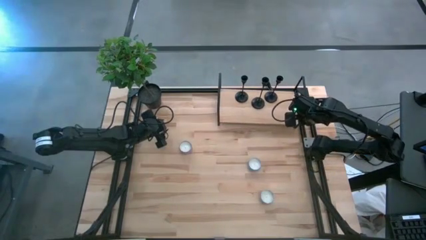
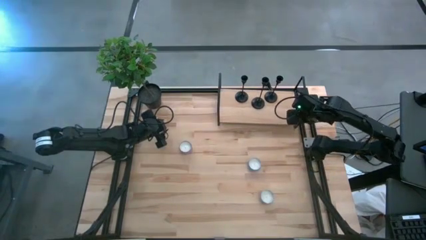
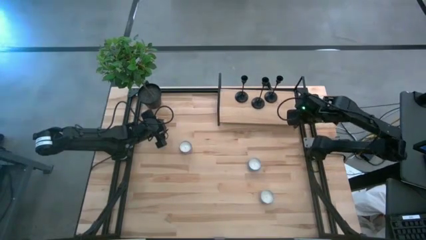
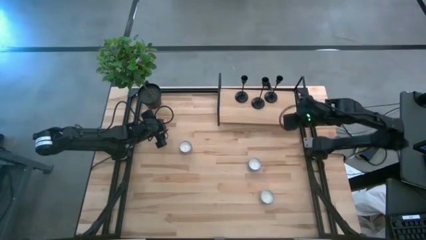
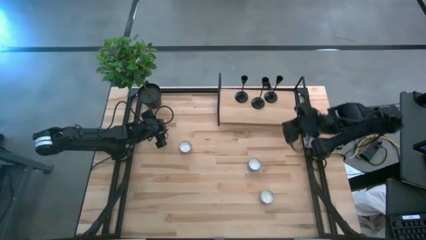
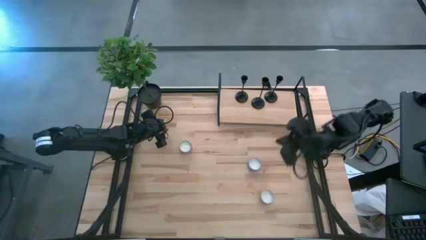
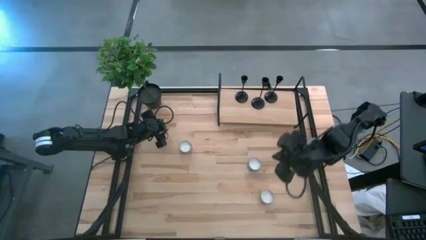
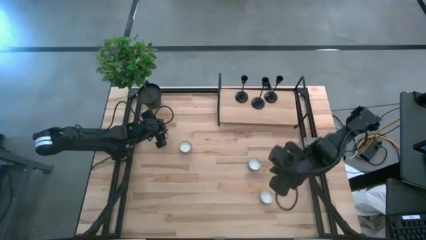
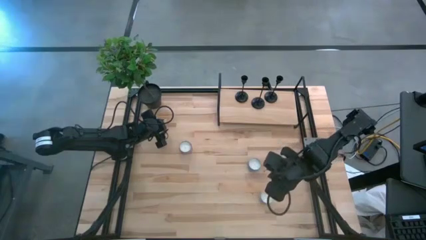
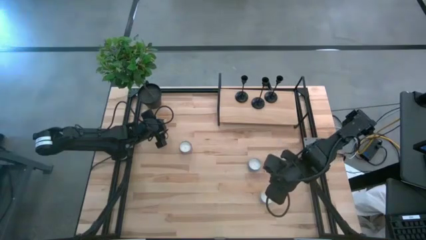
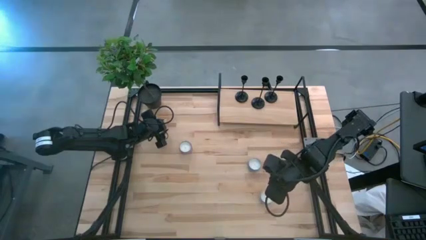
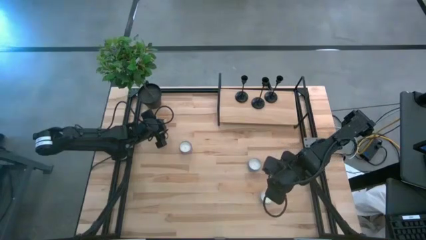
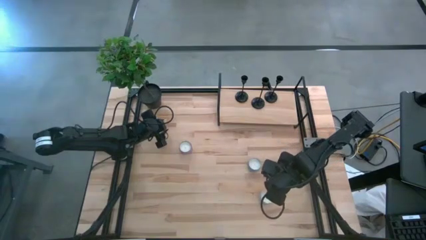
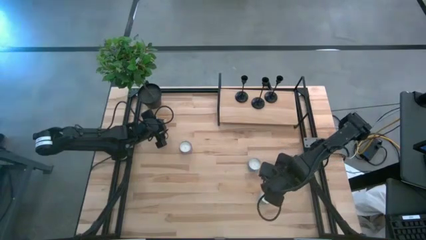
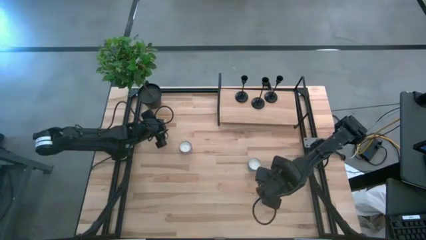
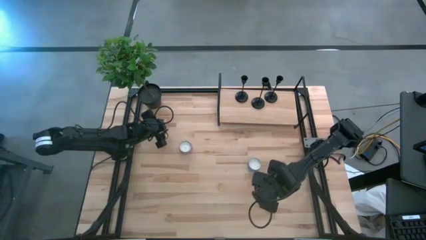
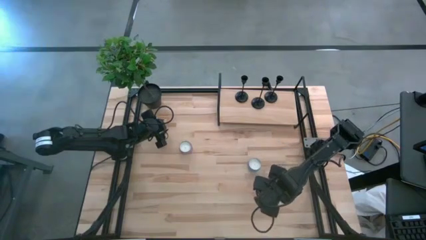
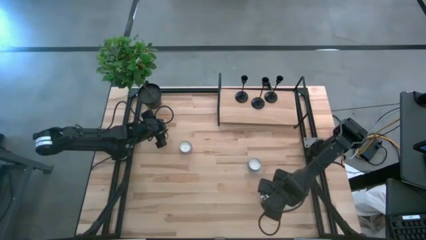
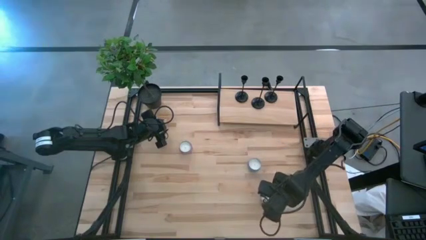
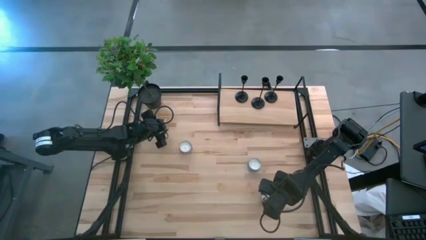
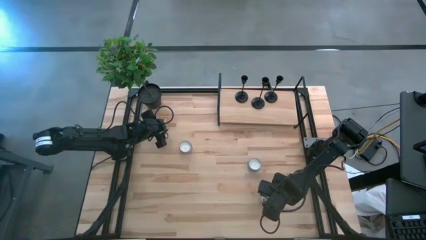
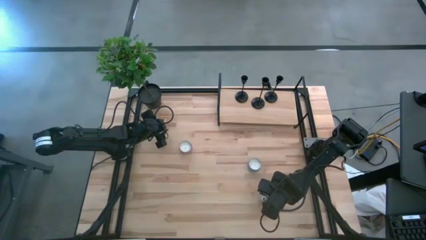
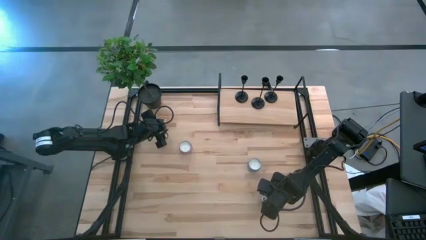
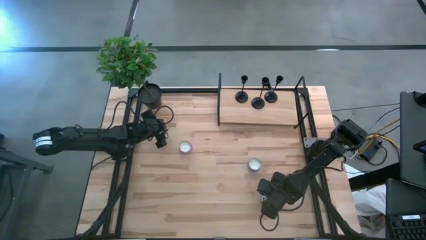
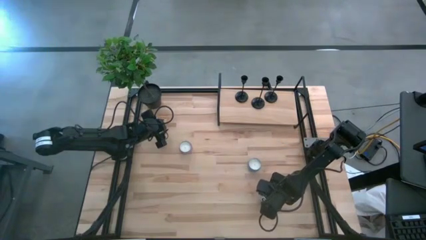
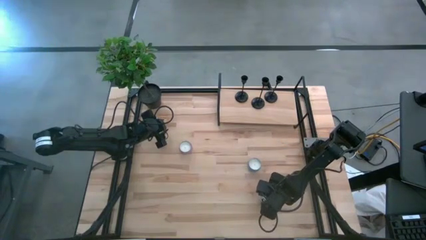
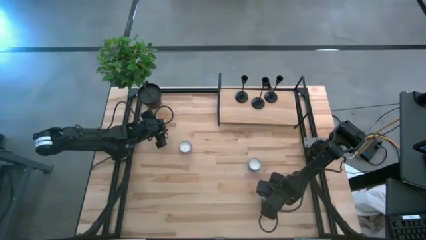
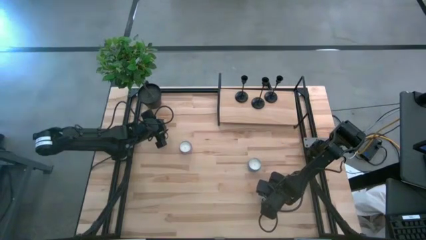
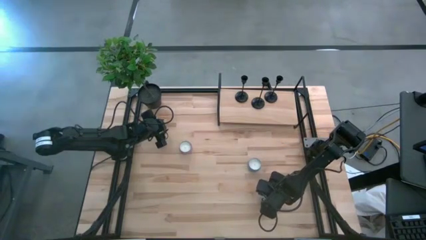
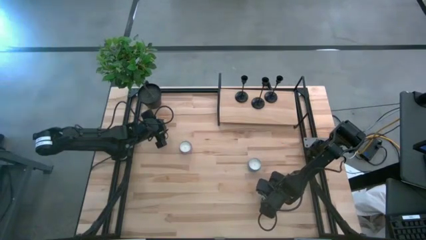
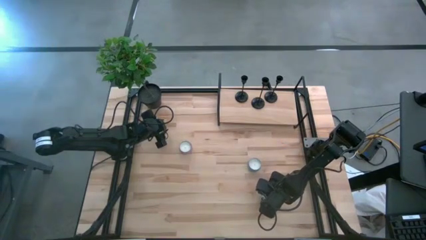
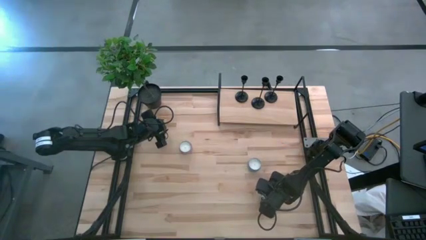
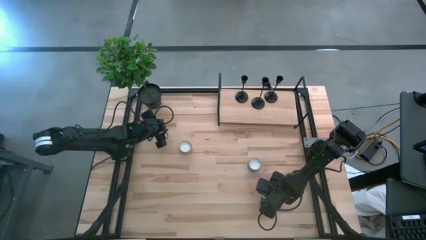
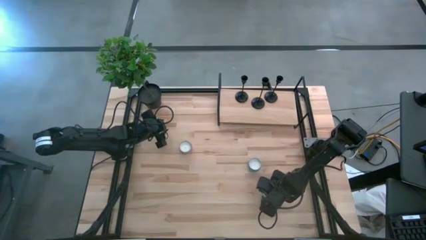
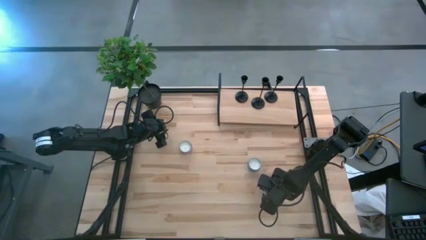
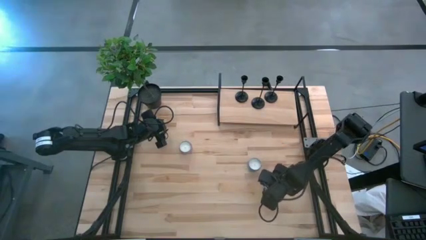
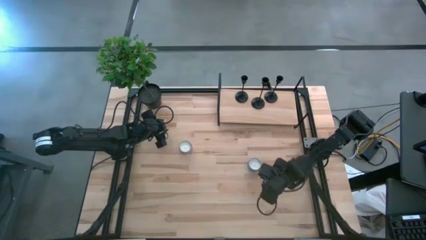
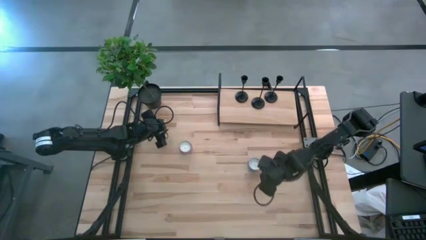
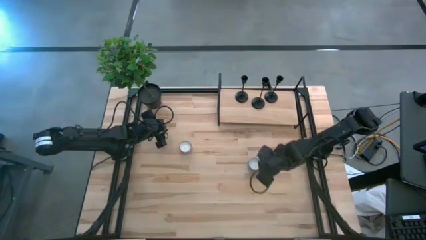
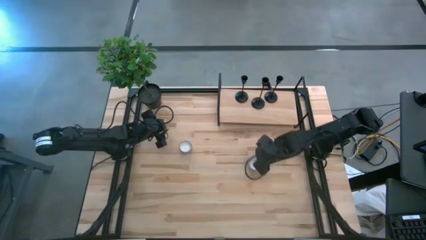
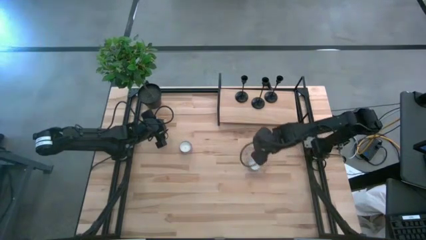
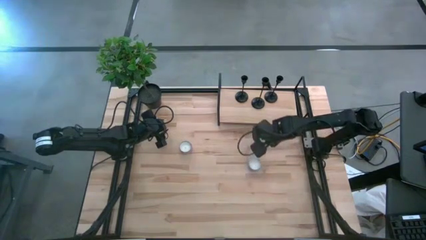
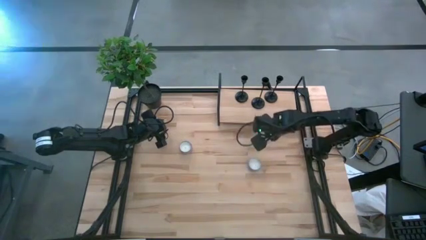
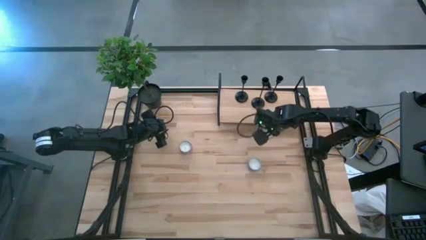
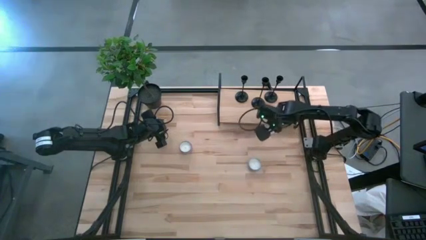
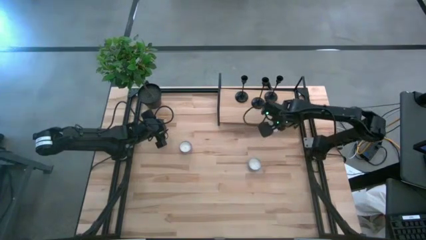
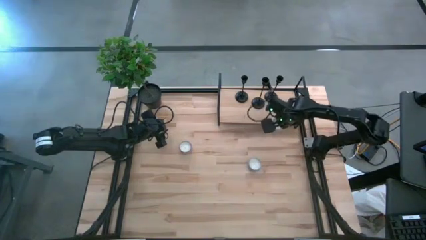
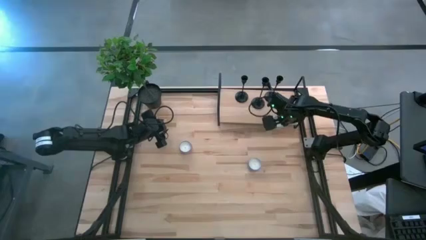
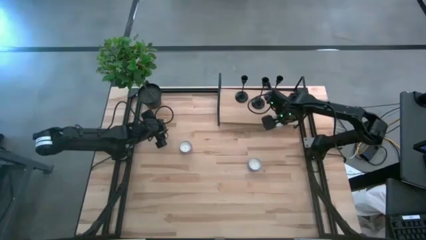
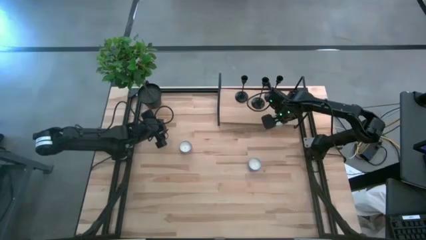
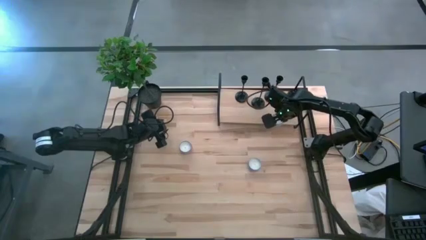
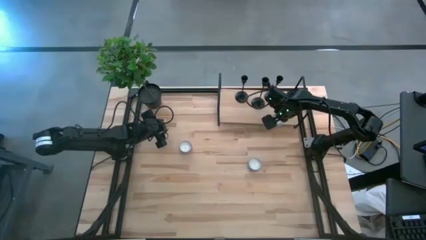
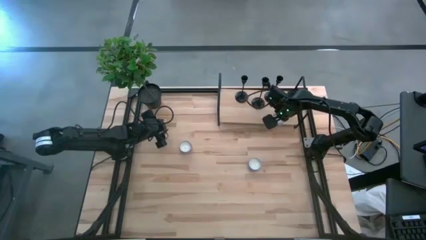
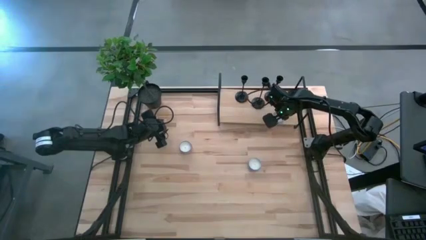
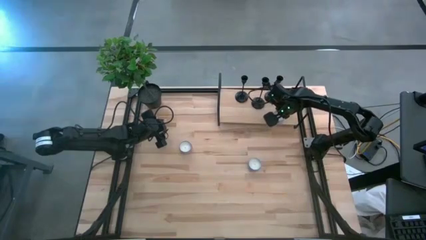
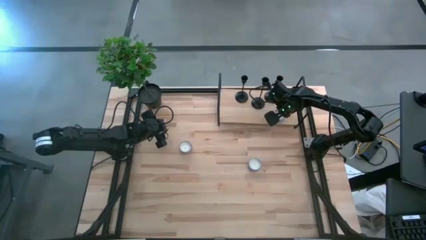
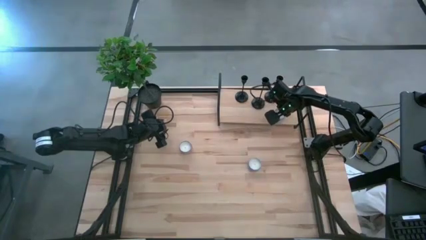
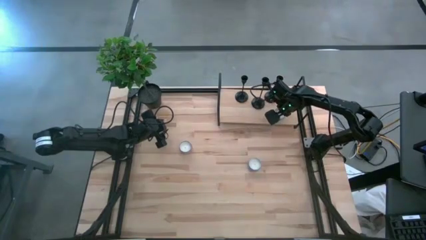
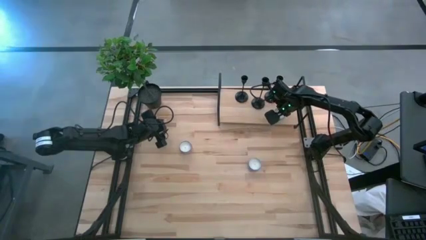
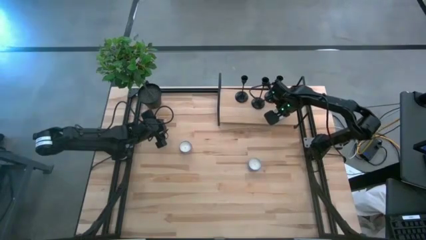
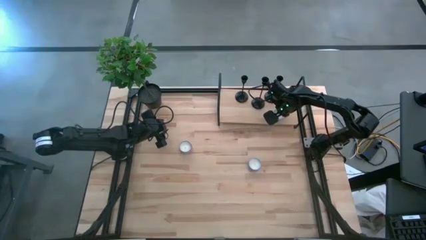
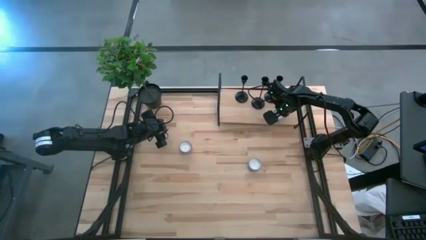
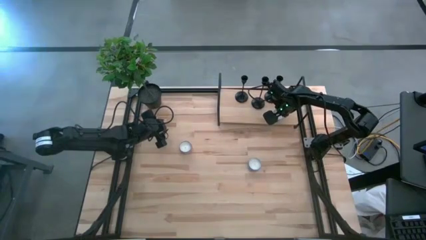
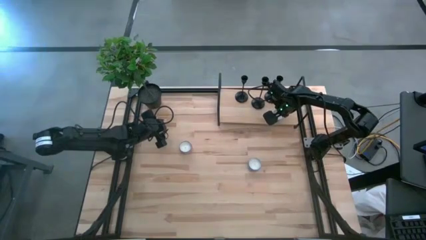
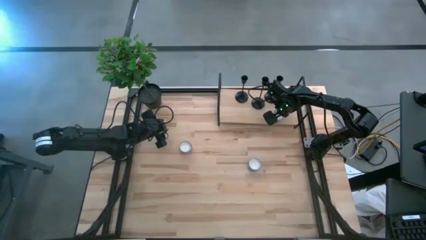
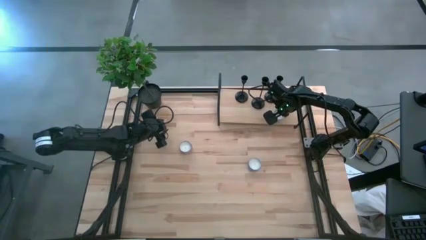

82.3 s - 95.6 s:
Task: Pick & Place candle stick holders
Put the red scented candle on the shelf

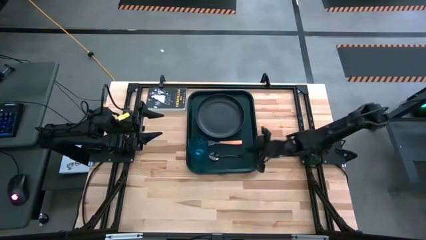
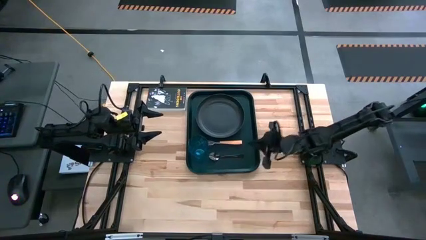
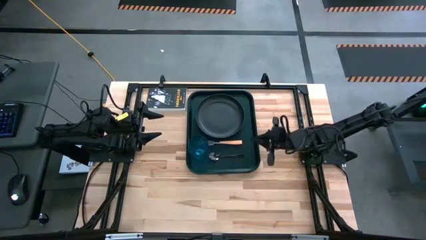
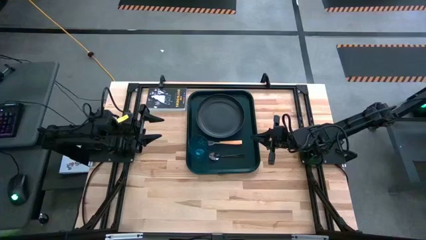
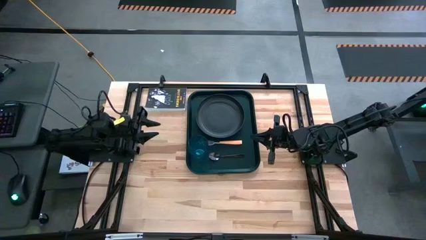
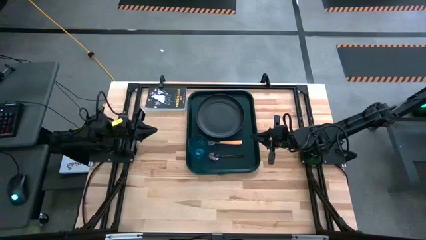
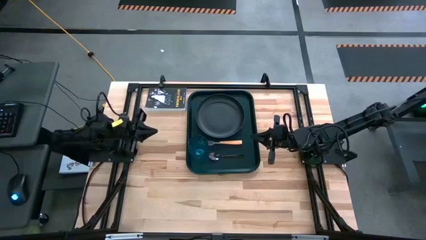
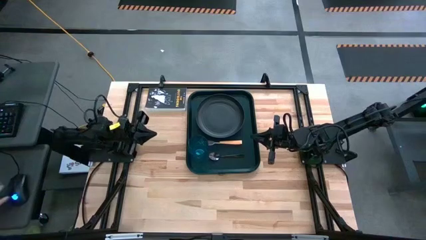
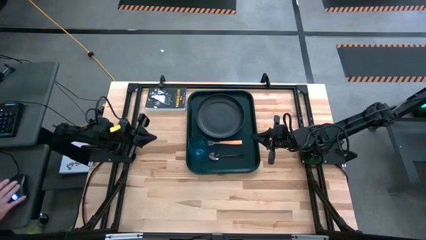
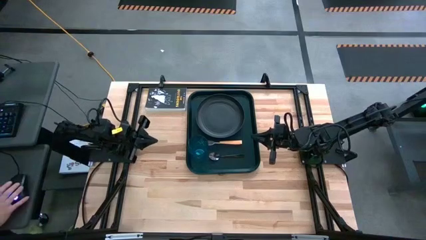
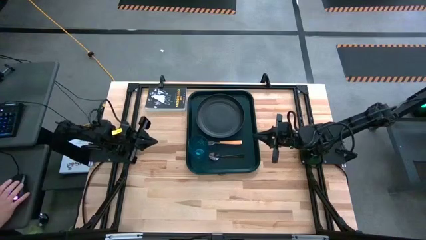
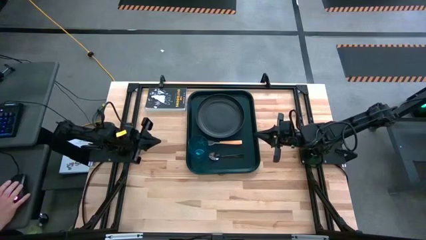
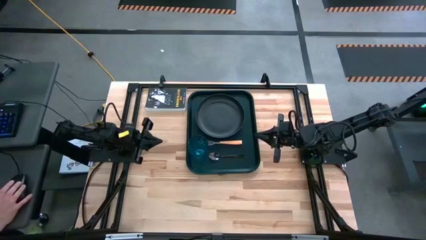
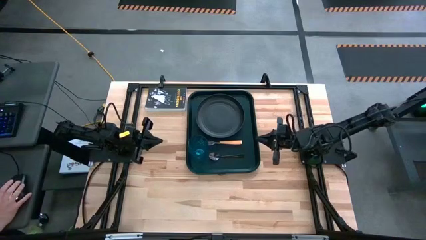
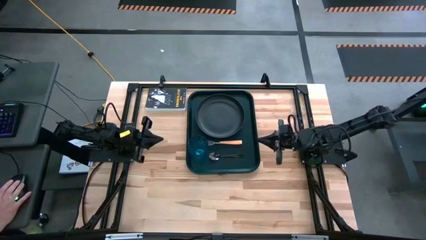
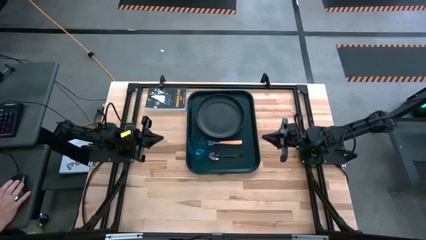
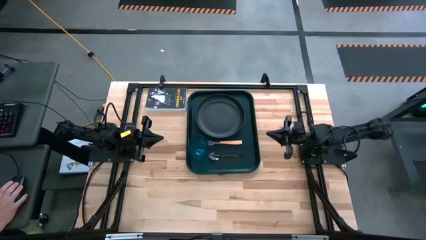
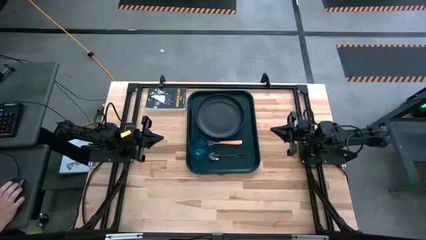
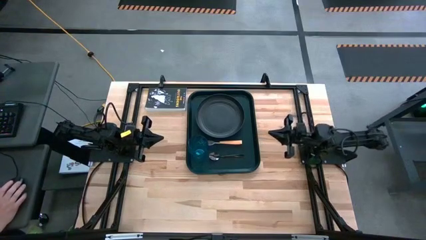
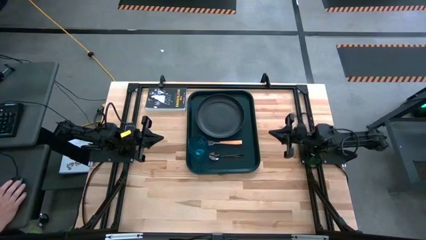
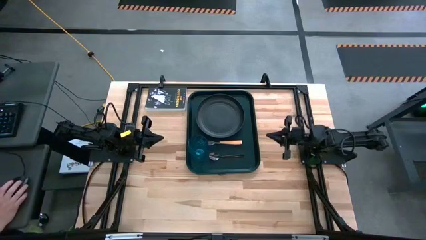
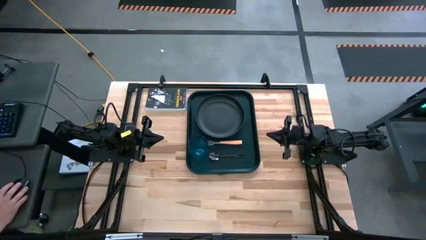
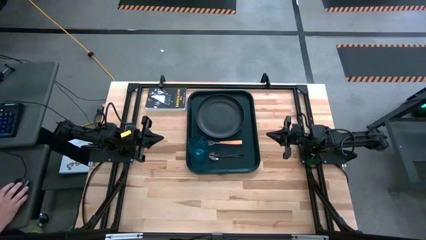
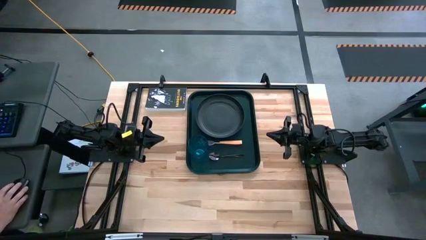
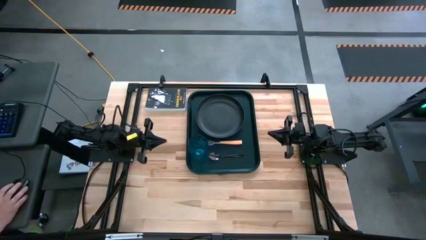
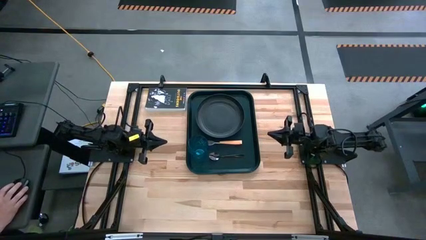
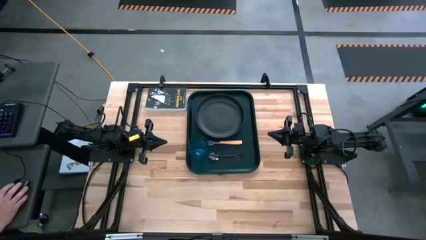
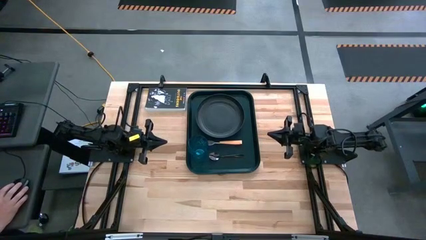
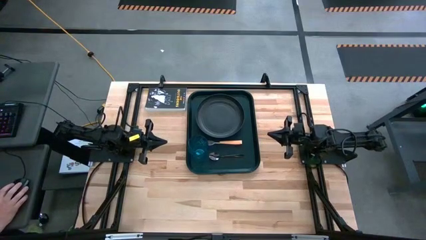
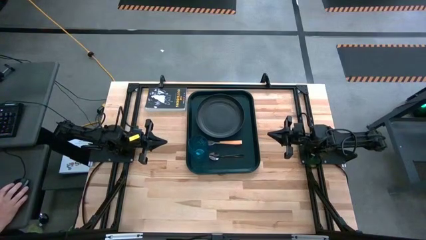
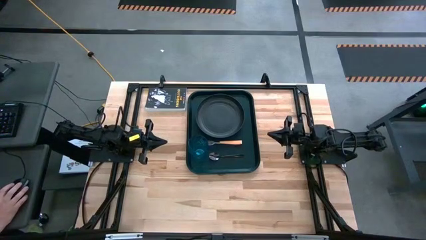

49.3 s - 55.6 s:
Task: Pick and place plate/cup/fork/spoon on tray
Return to Home Position
